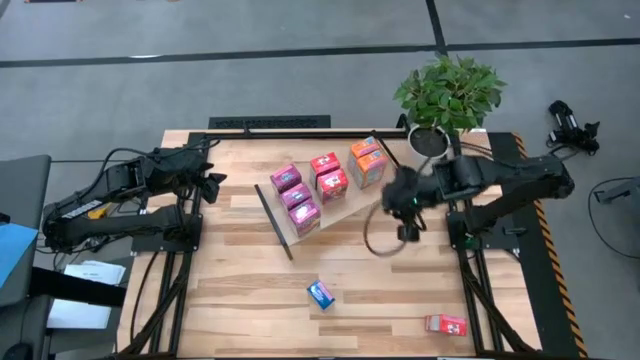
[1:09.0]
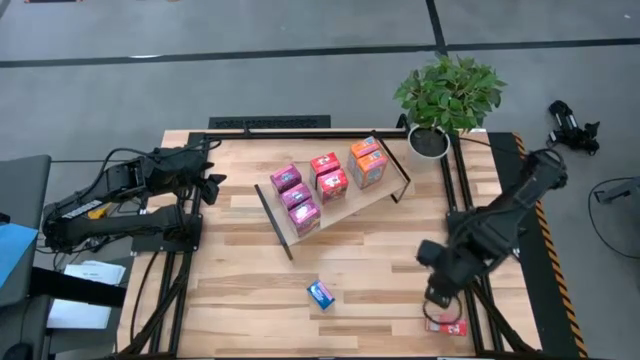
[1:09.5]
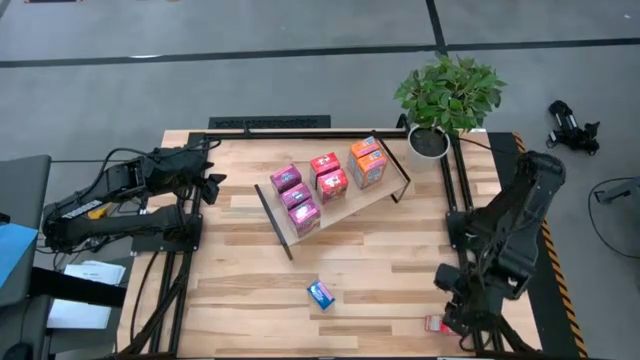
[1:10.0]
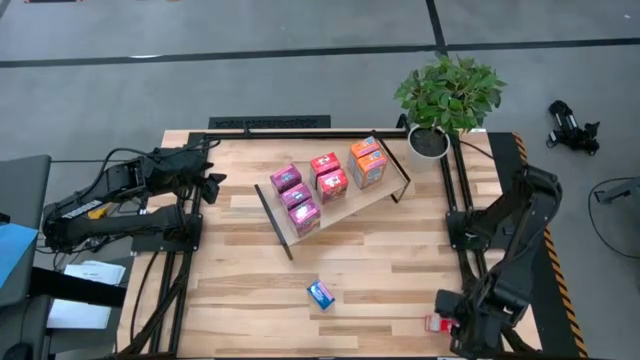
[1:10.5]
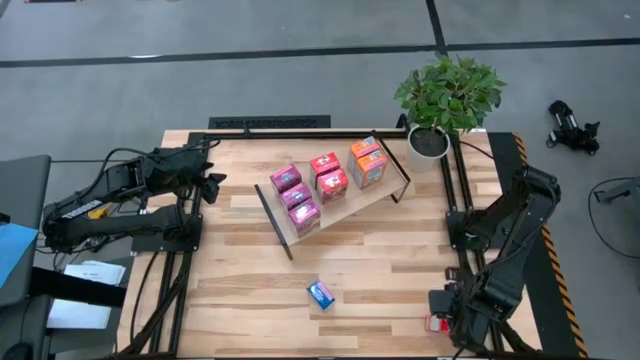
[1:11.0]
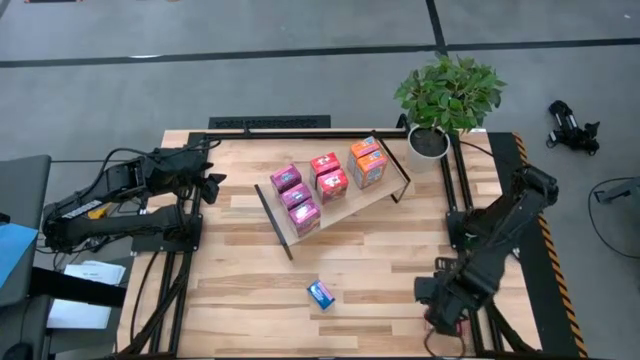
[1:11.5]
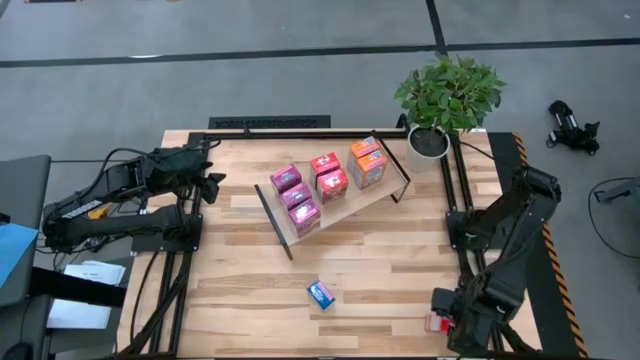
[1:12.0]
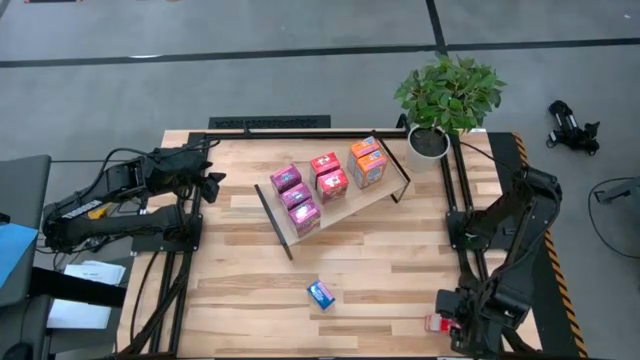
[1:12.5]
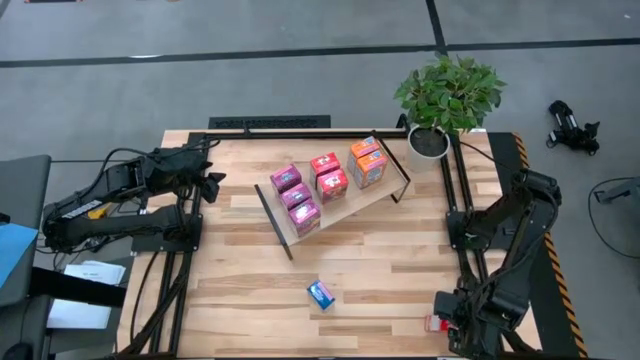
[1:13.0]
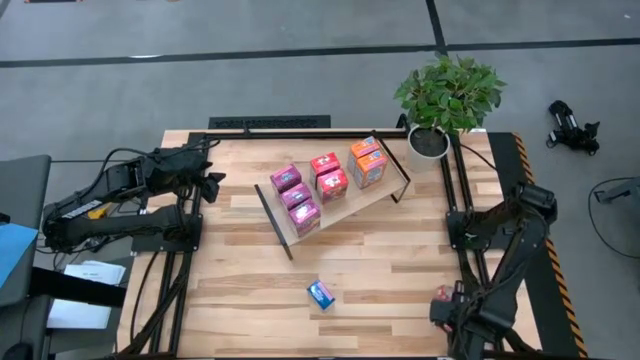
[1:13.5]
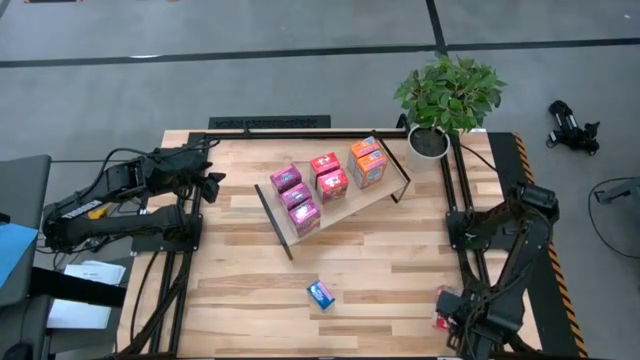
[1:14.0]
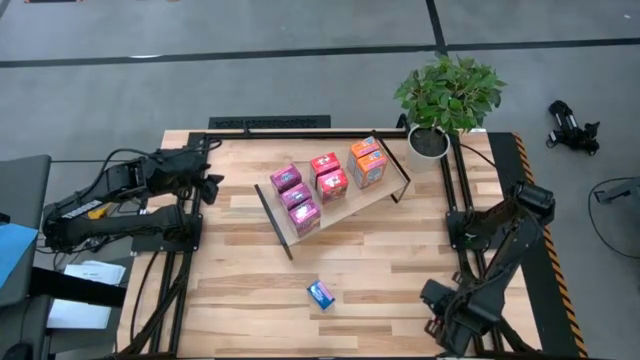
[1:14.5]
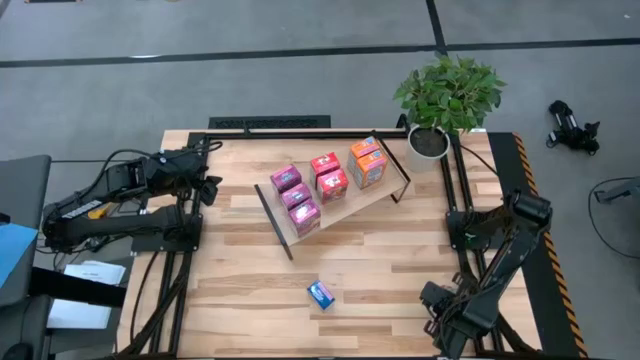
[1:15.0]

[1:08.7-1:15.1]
Task: Stack cereal on shelf
Put the red cereal box aligned with the other red cereal boxes on the shelf

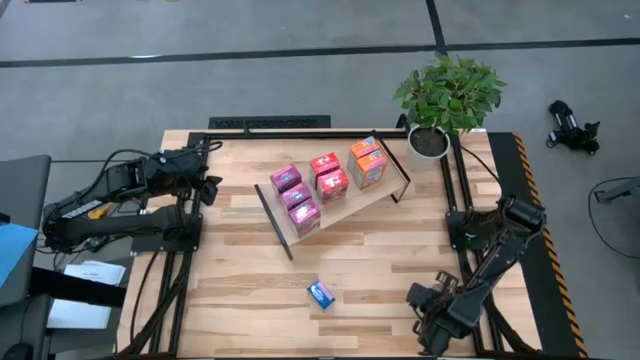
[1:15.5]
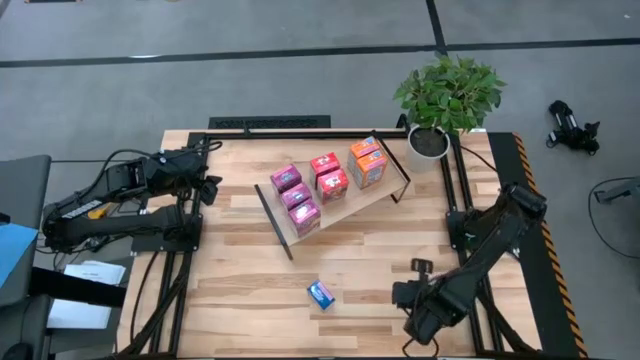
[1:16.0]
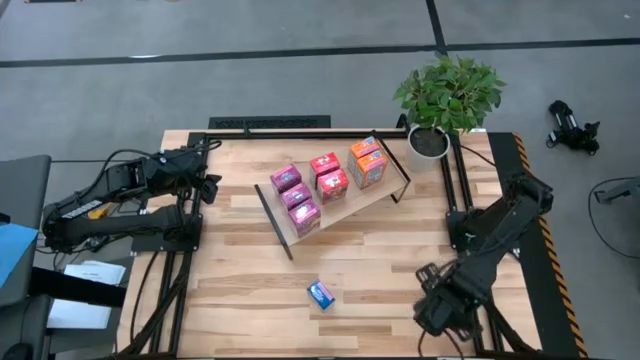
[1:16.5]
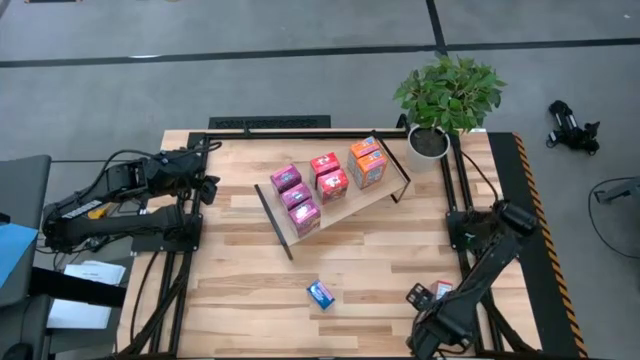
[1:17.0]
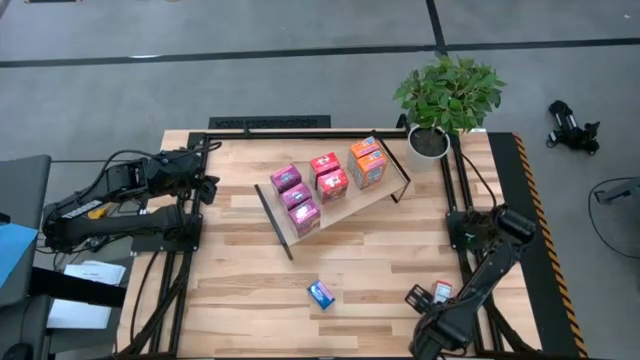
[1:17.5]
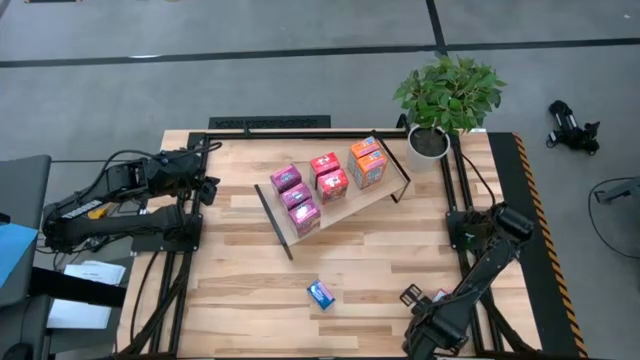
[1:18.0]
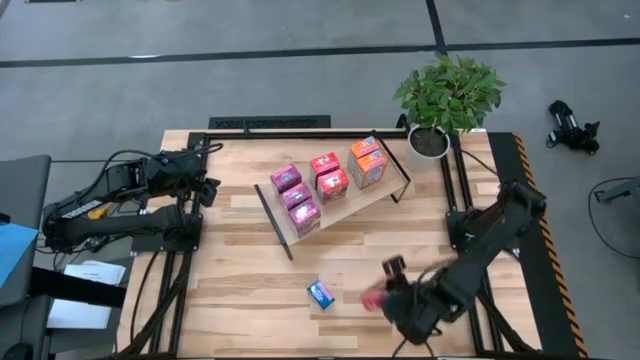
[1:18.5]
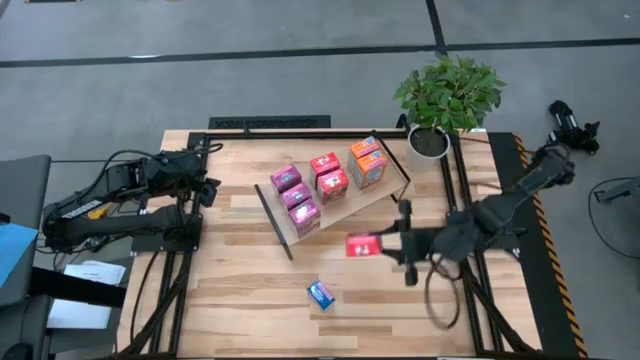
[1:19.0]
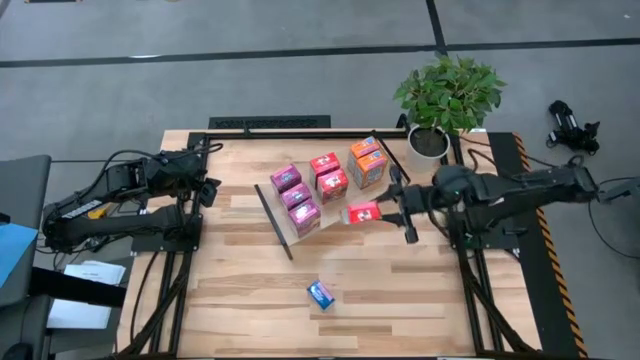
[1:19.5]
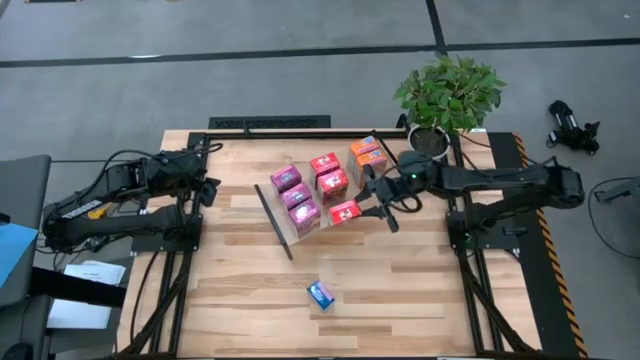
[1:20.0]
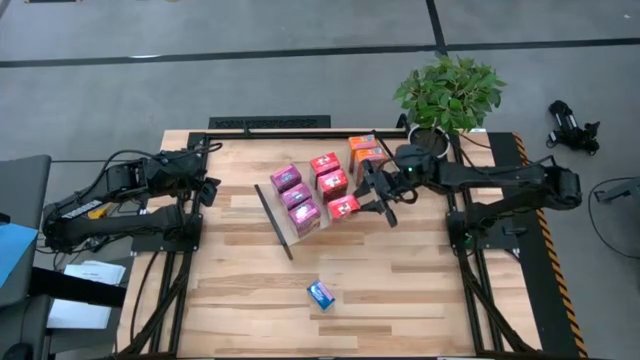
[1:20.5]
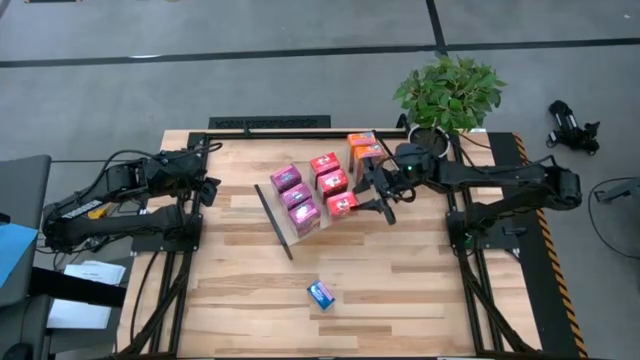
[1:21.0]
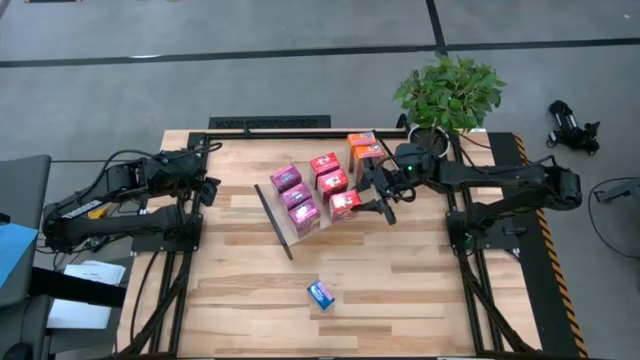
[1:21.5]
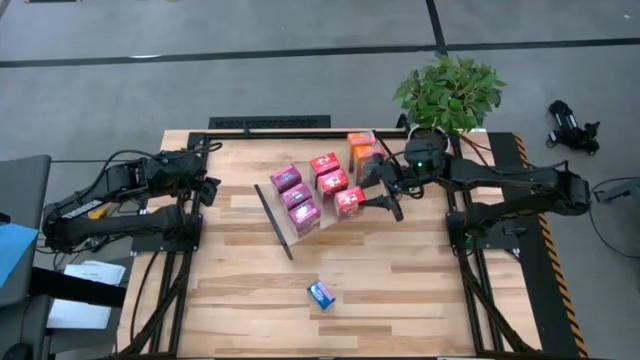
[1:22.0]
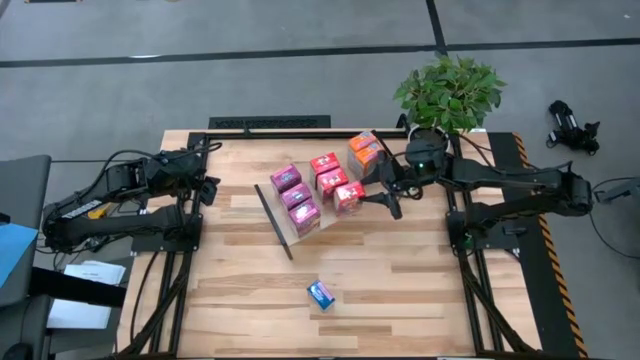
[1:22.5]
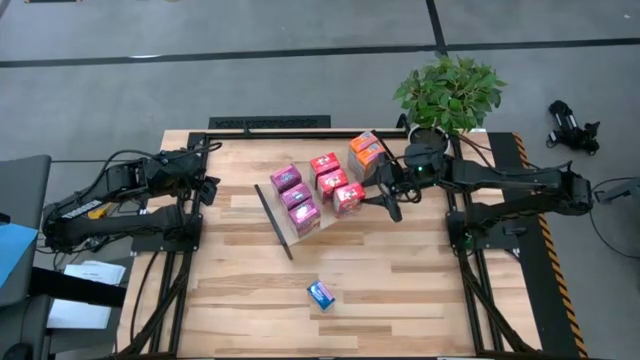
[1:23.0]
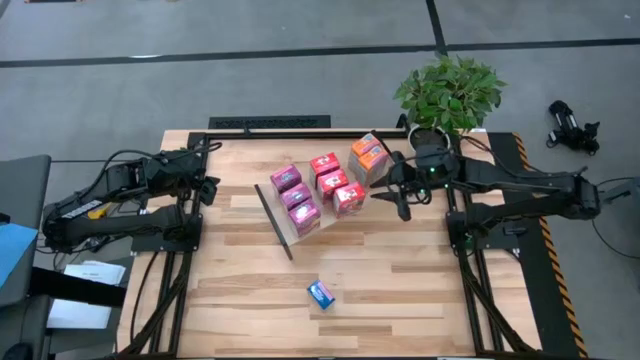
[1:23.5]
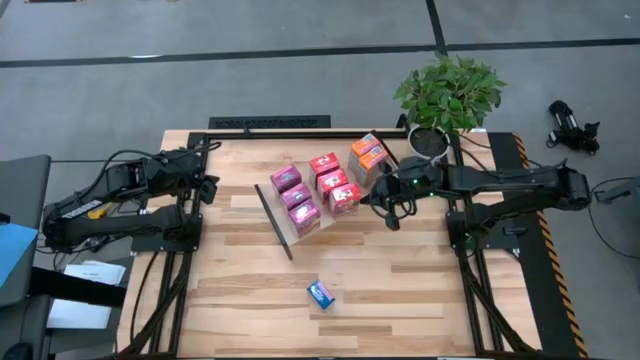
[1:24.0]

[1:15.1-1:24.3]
Put the red cereal box aligned with the other red cereal boxes on the shelf

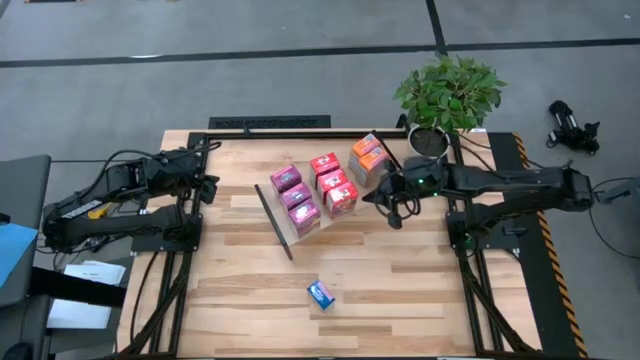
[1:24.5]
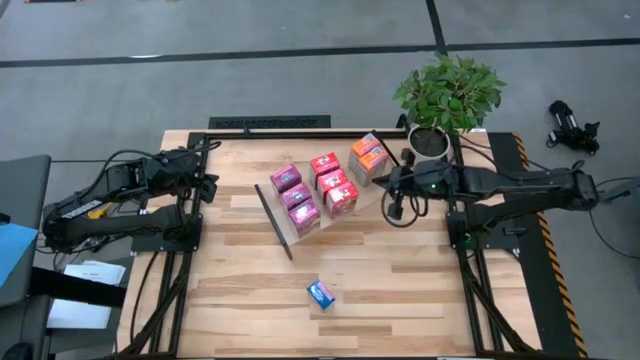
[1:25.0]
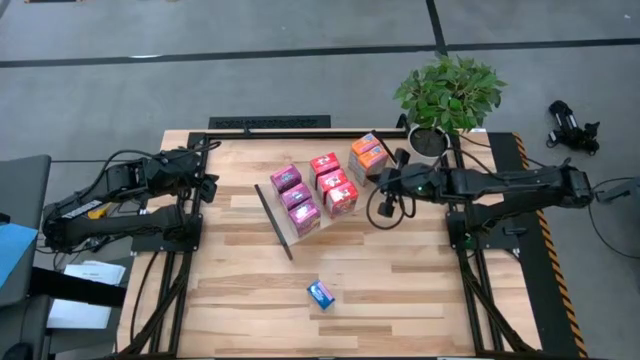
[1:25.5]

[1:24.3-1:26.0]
Adjust the orange cereal boxes on the shelf

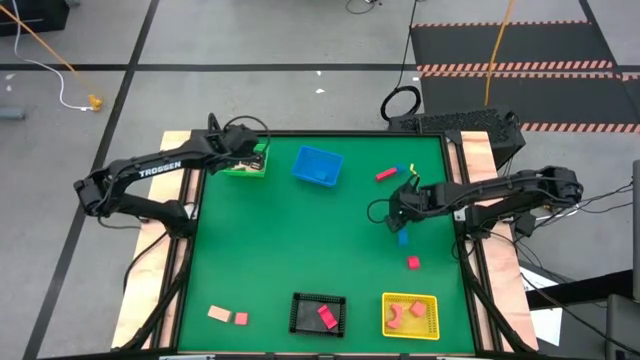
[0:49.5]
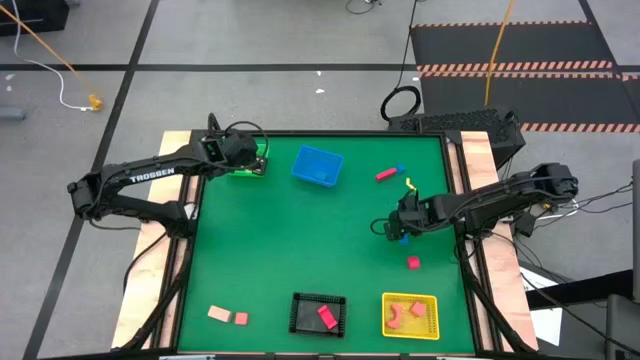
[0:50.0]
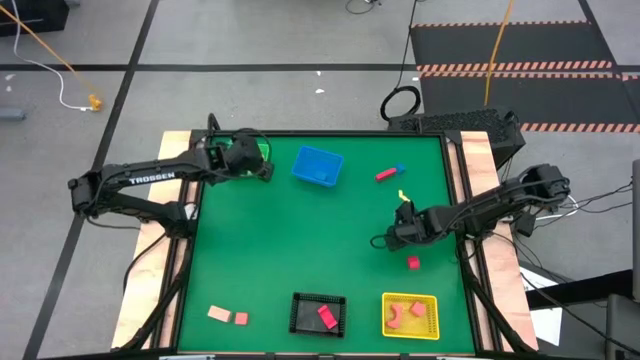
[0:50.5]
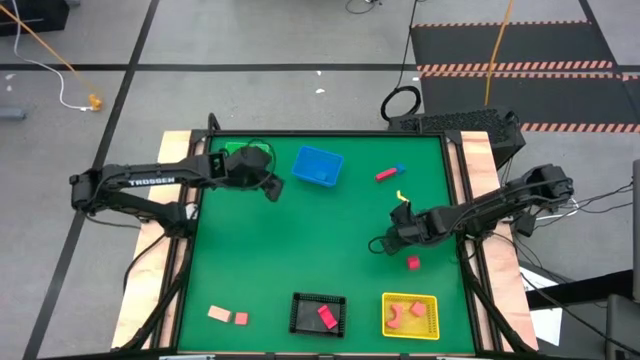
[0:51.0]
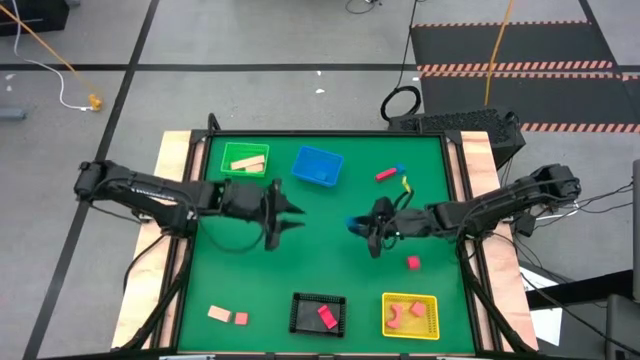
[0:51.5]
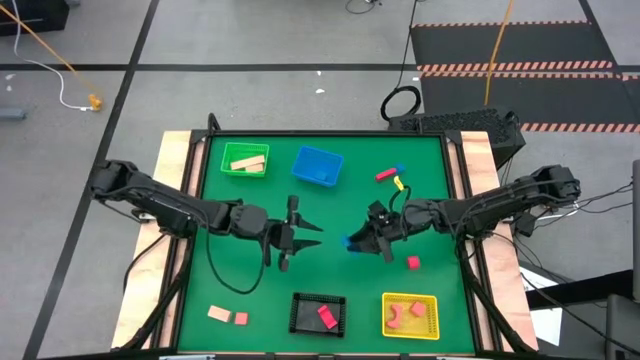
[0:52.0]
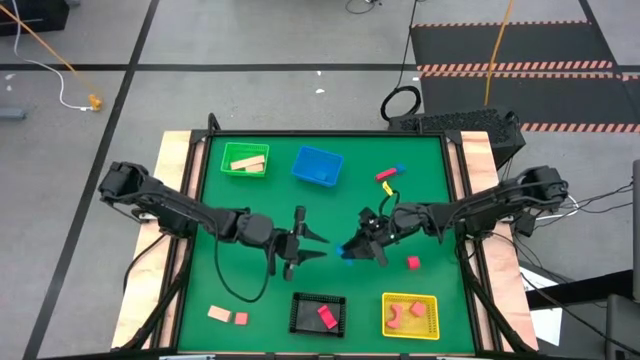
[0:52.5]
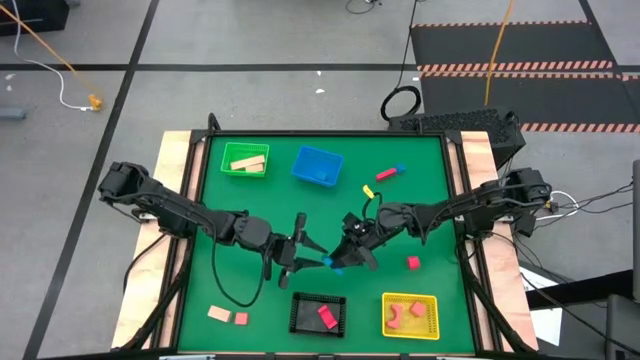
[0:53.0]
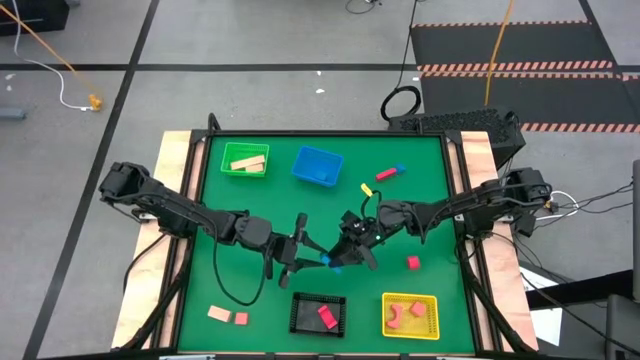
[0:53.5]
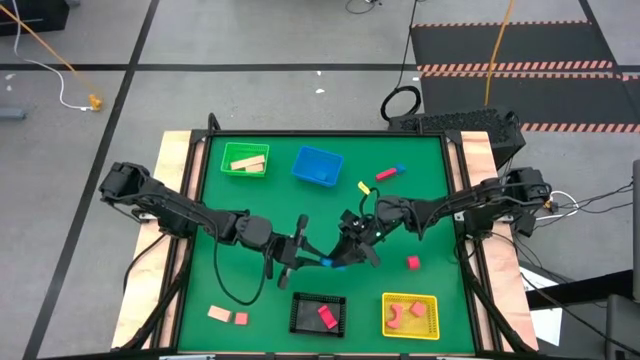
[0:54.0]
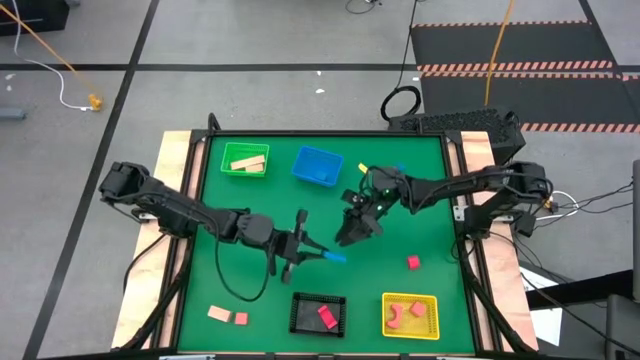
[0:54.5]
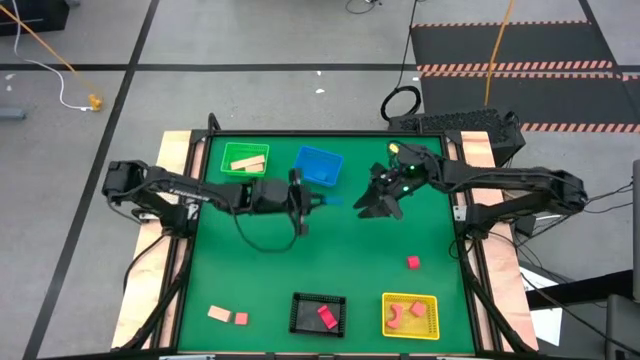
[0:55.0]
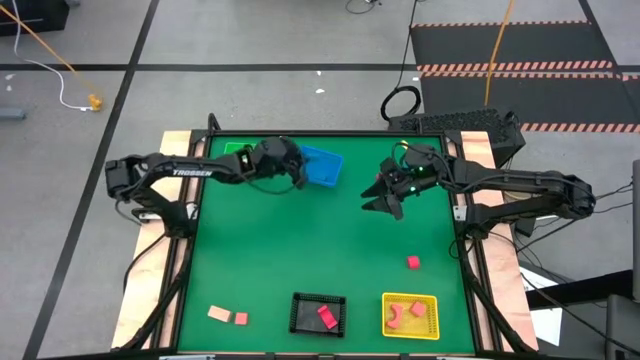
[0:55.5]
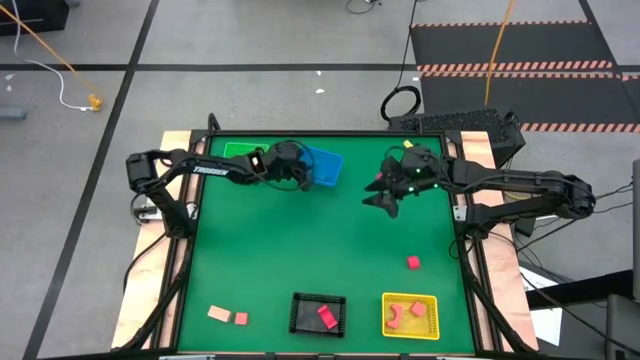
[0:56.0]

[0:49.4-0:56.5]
Task: Sort & place blocks by color
Put the bottom blue wooden block into the blue basket
